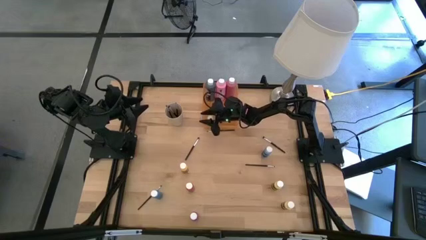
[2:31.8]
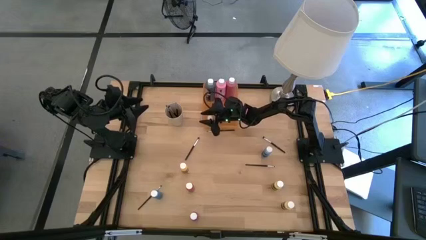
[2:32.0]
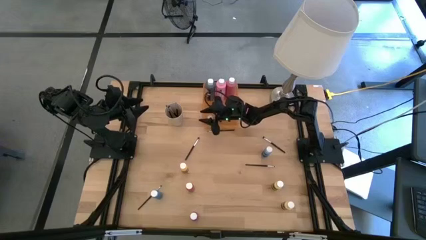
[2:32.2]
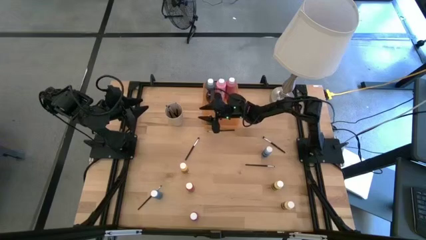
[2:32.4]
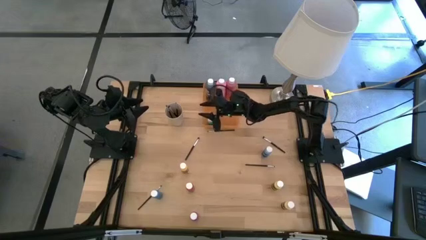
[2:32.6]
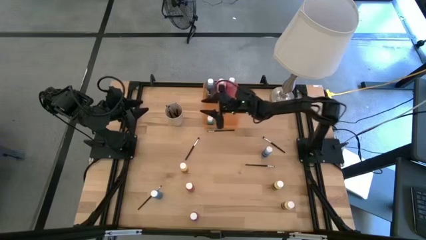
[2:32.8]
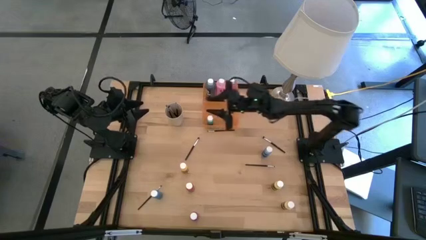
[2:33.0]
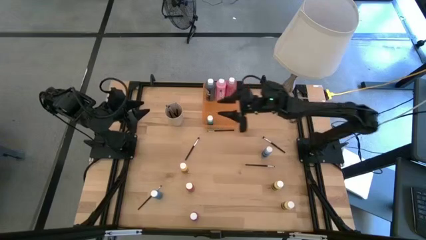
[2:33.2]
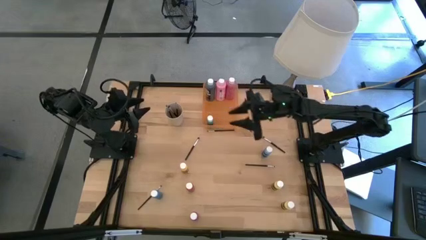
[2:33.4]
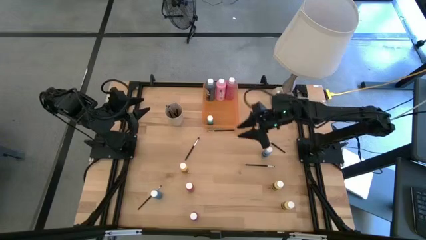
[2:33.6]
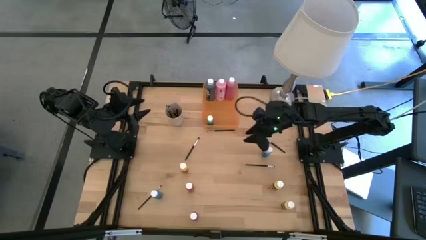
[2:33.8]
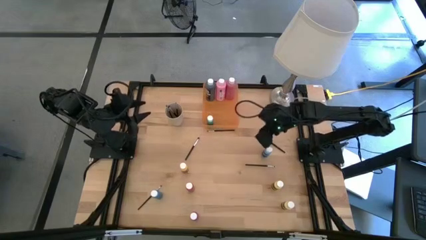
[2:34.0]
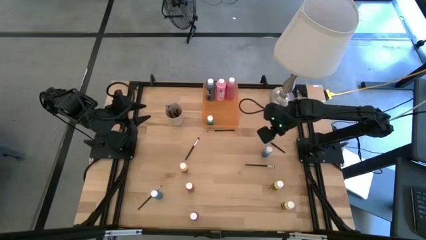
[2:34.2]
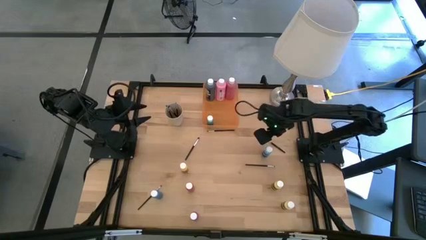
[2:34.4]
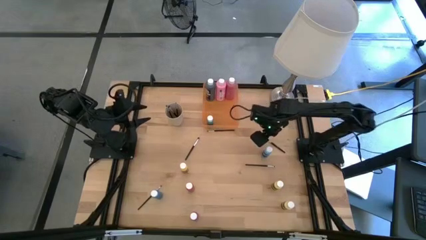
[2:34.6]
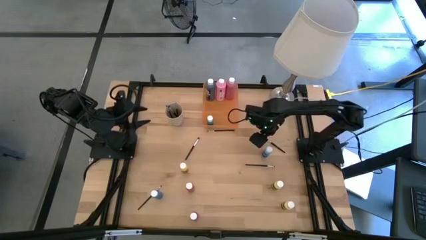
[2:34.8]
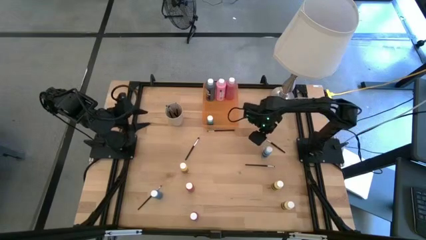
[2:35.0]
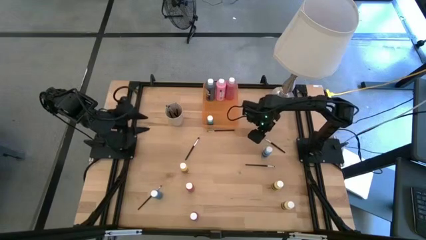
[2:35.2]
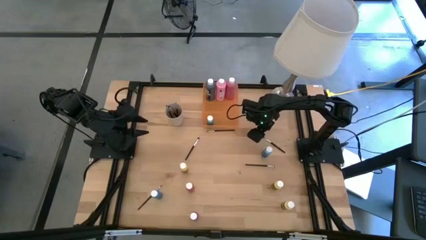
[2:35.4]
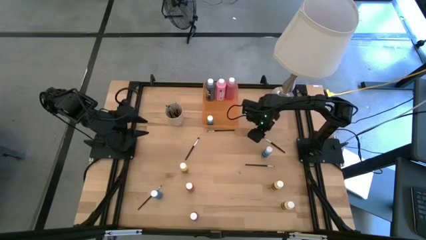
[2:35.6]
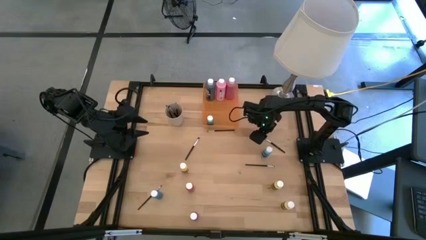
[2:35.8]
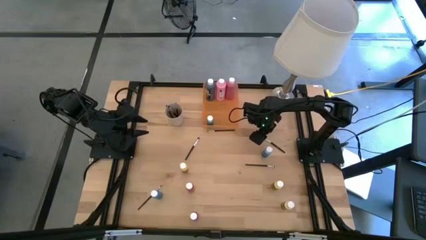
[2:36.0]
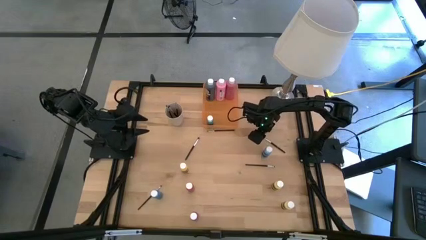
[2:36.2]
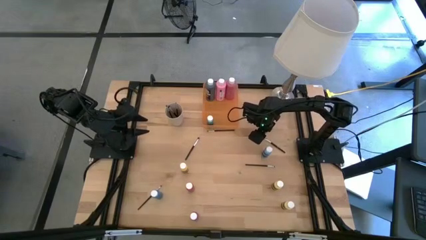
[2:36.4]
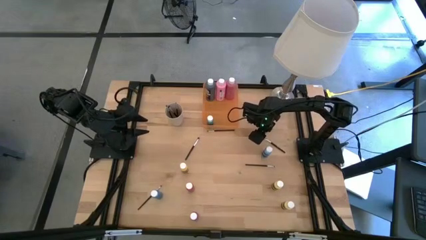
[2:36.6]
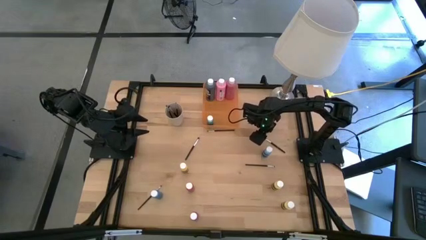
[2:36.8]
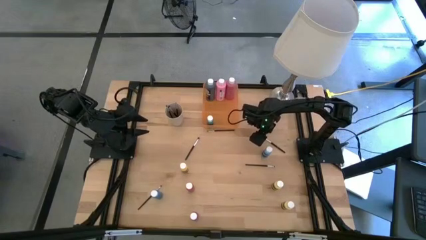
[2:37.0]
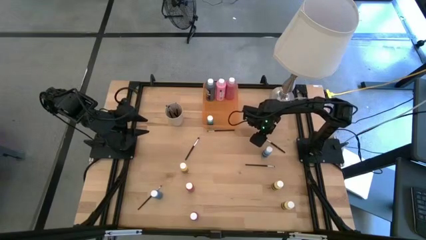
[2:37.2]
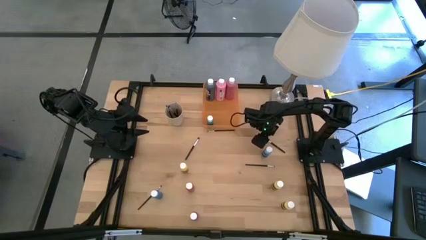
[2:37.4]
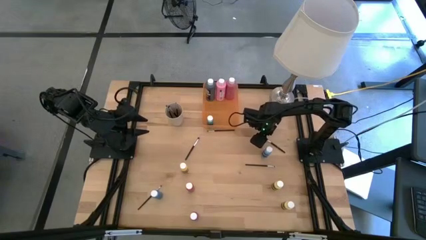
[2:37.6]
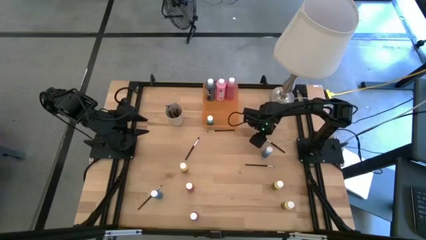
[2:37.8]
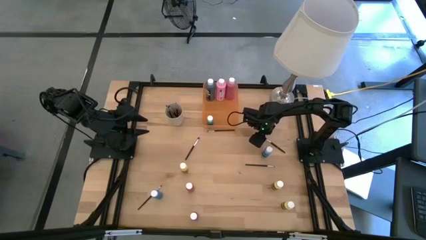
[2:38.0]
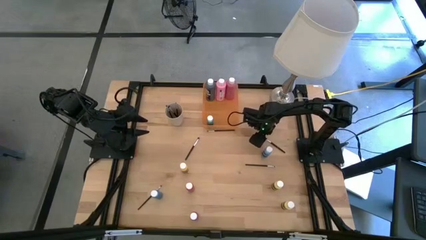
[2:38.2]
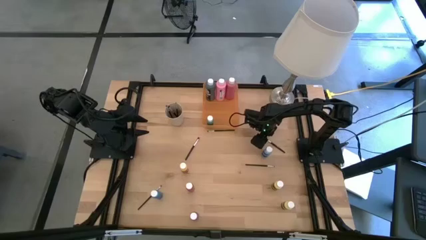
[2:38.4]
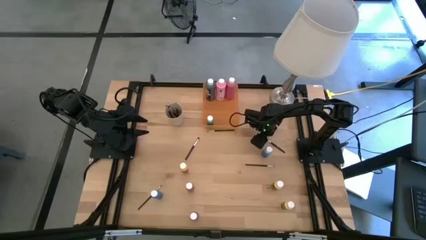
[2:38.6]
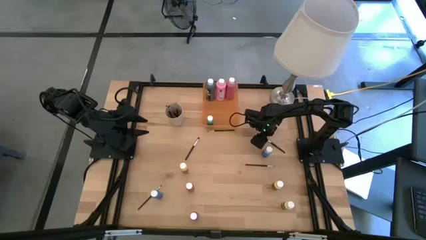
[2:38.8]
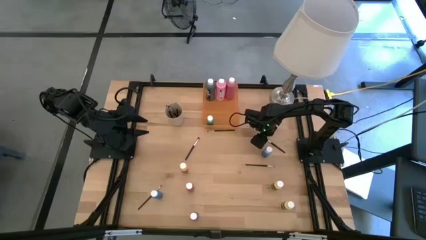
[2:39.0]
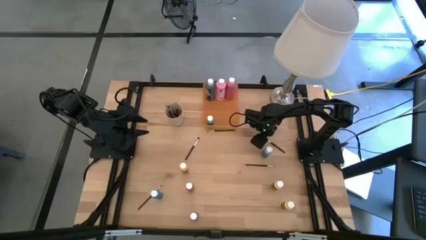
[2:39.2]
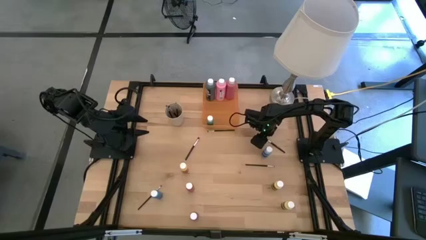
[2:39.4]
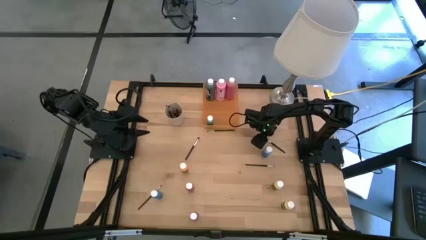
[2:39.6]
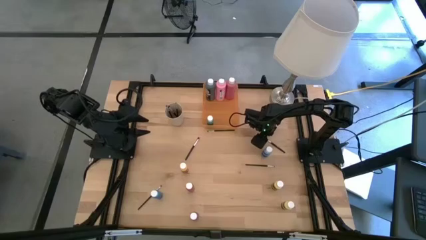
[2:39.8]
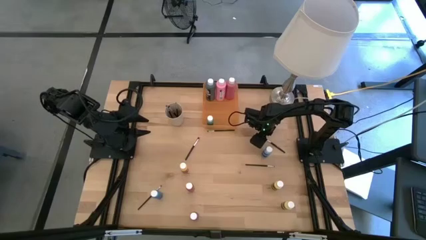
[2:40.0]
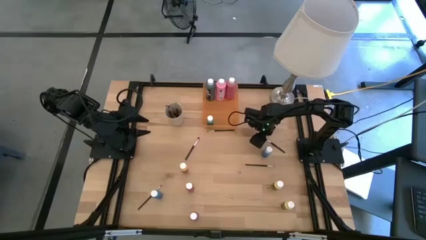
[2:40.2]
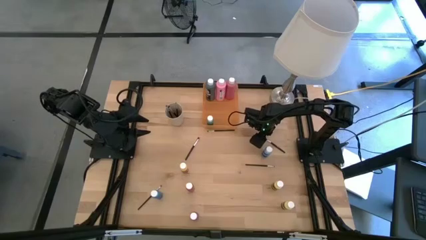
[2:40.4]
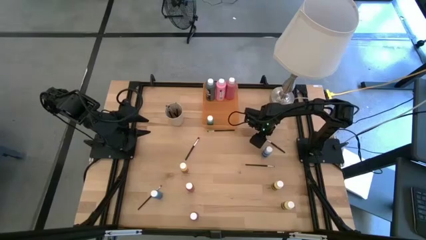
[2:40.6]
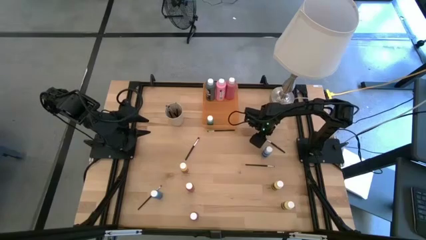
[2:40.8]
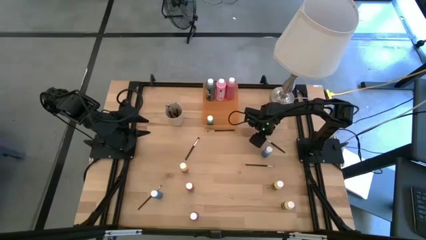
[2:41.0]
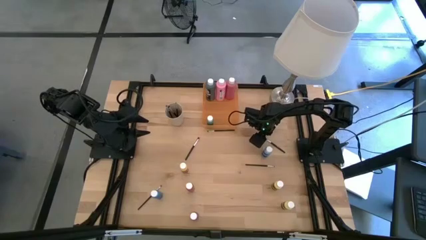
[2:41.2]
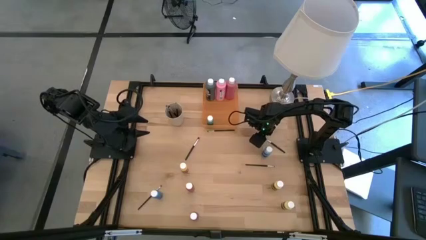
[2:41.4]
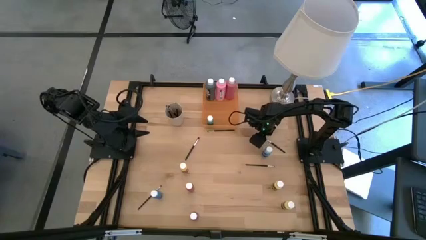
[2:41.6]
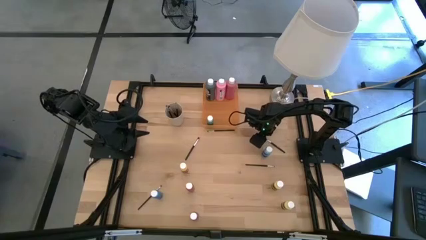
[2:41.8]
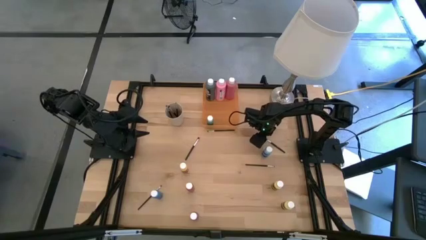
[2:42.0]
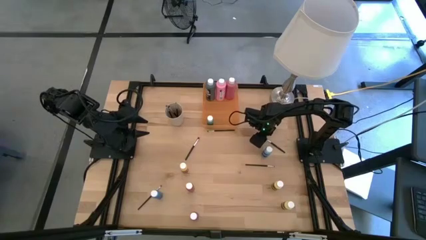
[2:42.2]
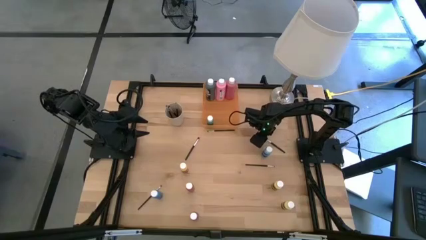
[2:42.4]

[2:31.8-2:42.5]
Task: Pick & Place Paint Supplies
Put the black paint brush into the white cup

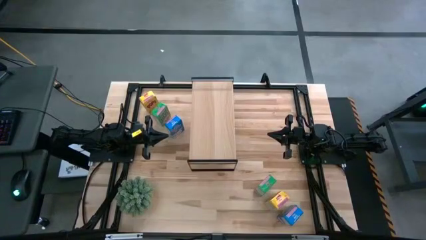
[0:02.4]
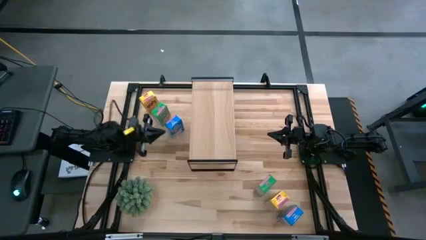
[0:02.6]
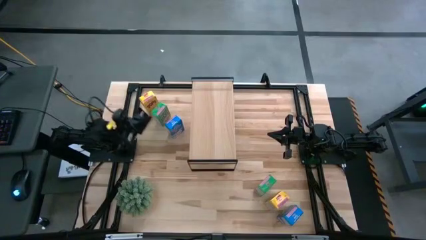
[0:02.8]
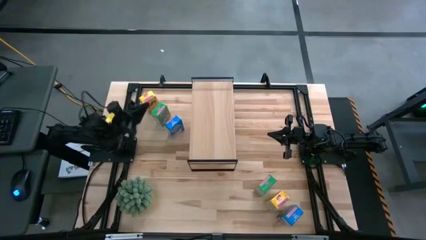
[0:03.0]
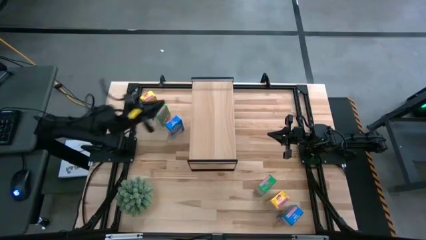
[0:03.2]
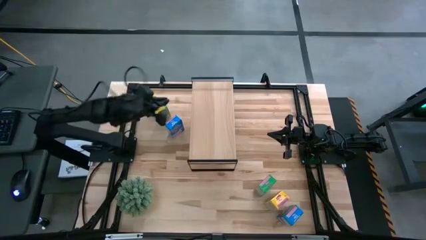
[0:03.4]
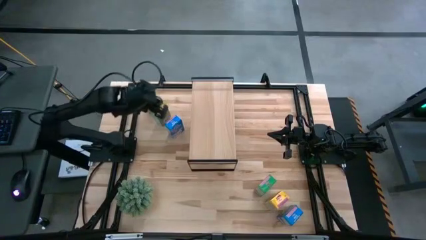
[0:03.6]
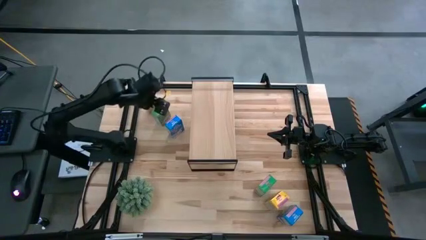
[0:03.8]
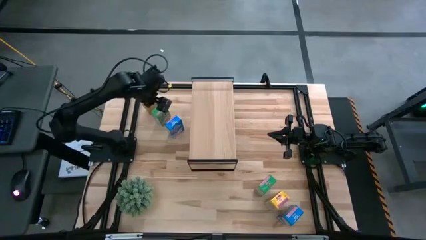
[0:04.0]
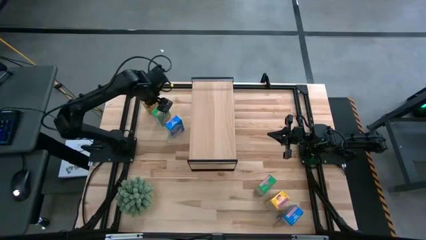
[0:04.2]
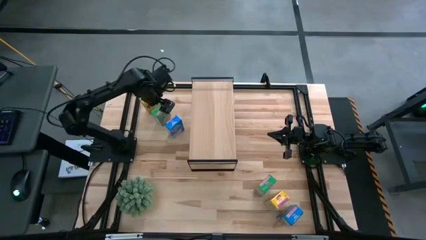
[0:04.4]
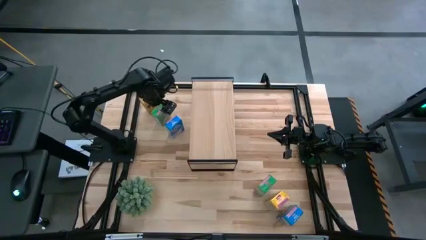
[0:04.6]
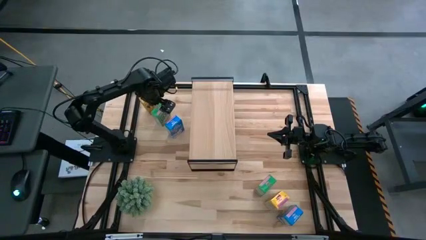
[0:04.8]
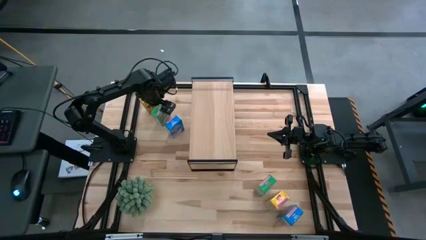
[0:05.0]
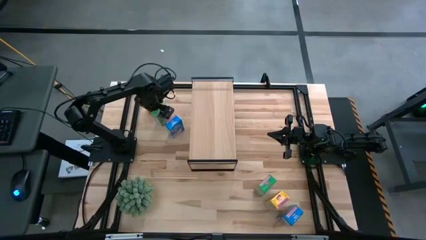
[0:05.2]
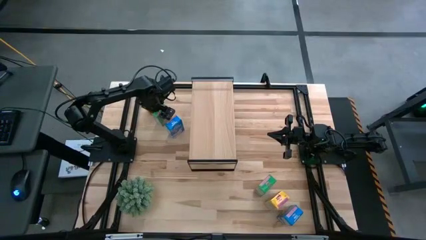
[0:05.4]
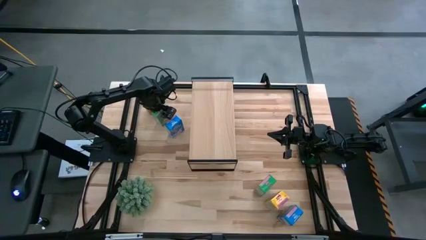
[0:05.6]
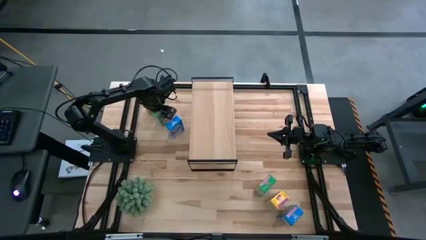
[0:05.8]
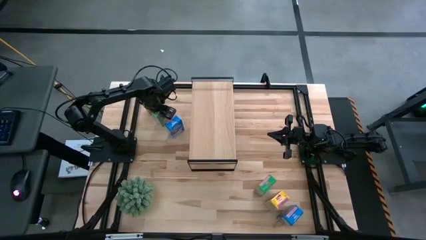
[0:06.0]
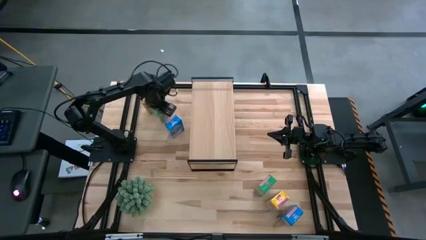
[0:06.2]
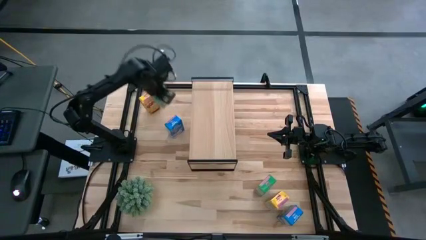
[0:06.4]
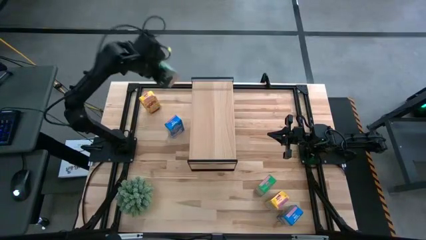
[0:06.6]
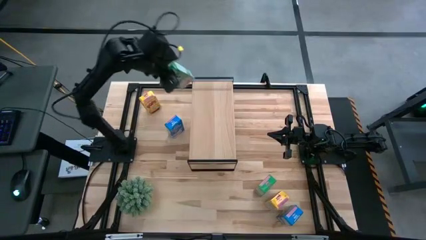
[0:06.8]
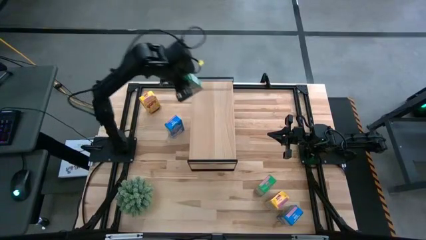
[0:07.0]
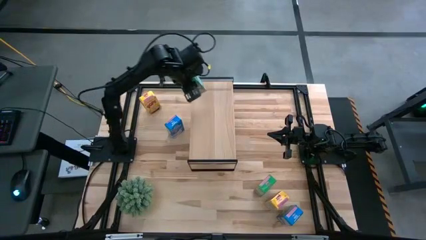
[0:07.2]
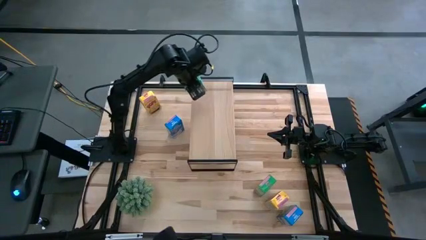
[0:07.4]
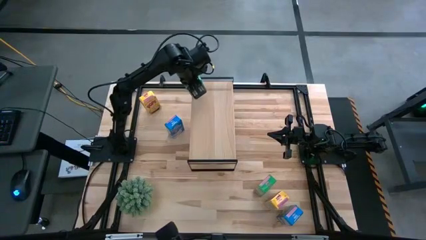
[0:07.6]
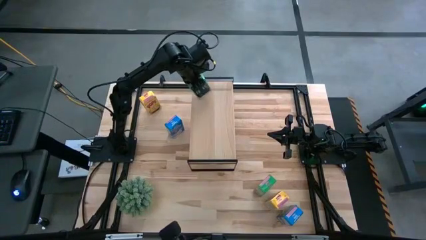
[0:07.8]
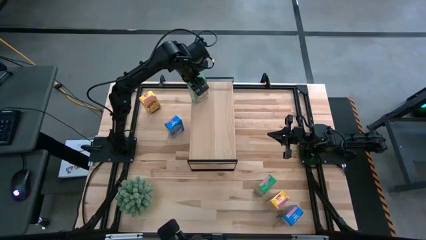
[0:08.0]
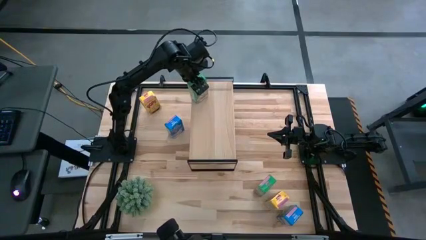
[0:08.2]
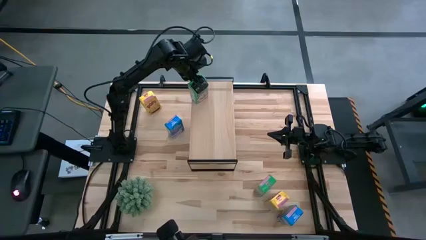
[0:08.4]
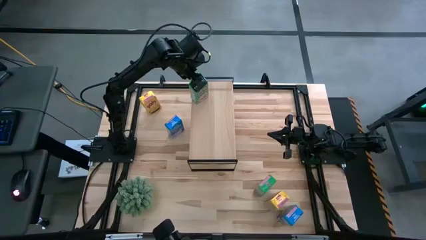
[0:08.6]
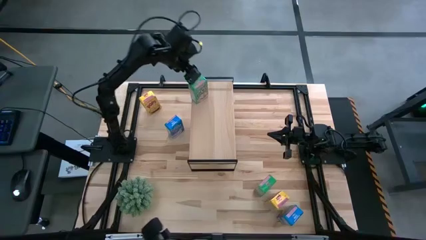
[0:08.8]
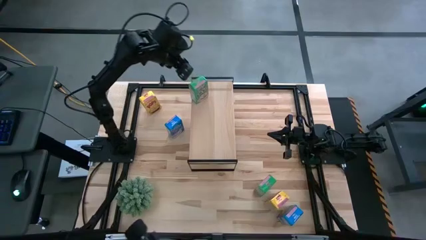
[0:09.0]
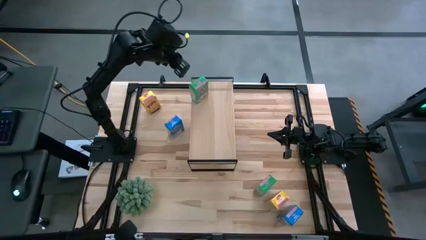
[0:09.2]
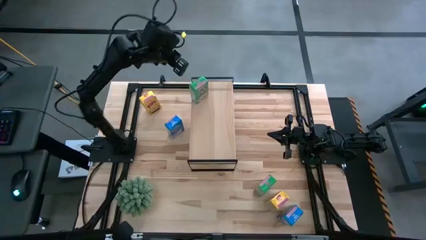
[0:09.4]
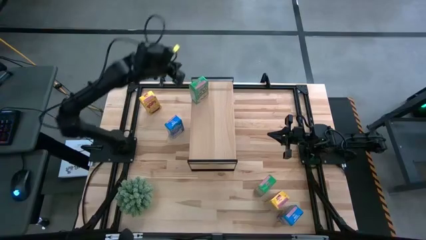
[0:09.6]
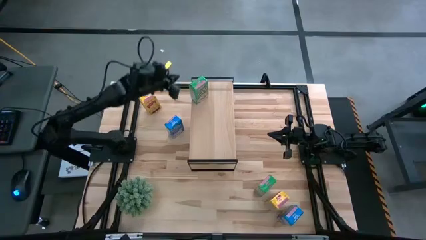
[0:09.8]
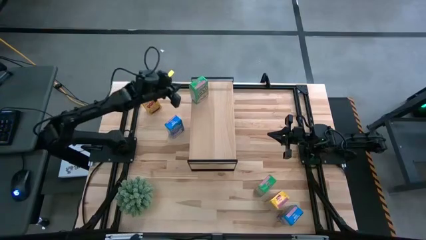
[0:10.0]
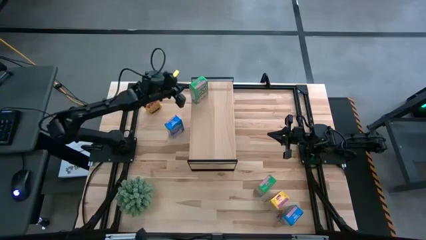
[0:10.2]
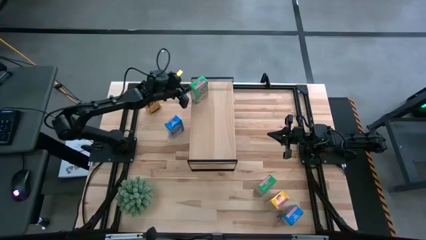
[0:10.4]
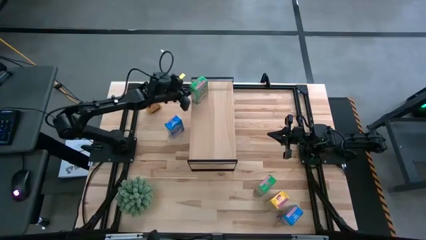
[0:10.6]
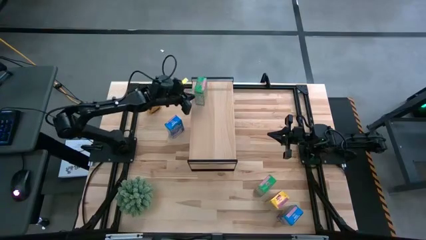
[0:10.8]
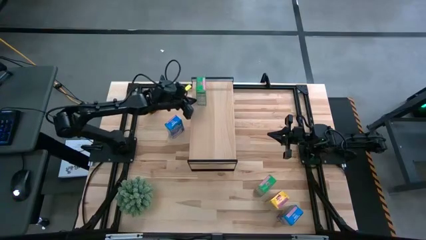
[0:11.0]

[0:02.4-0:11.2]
Task: Stack cereal on shelf
Put the left green cereal on the shelf
